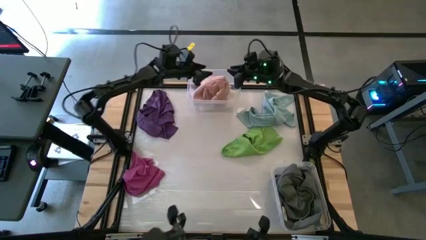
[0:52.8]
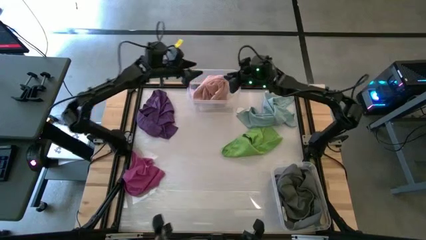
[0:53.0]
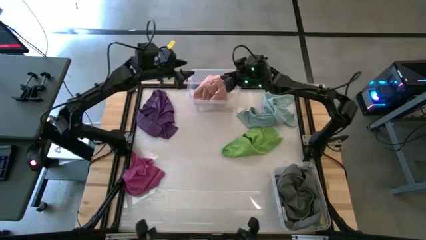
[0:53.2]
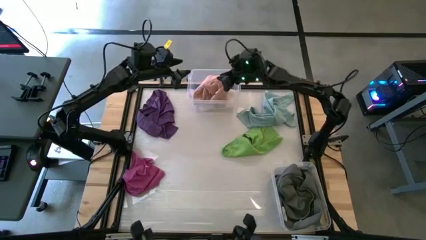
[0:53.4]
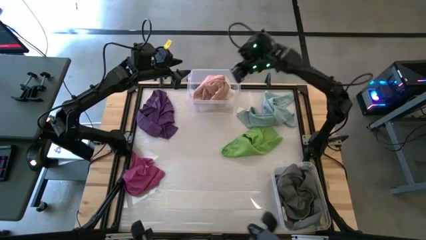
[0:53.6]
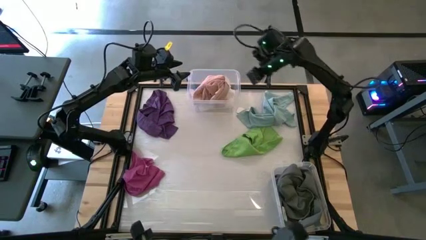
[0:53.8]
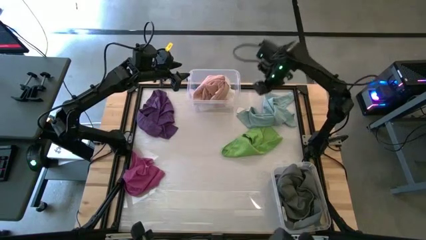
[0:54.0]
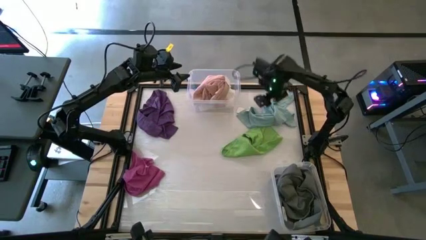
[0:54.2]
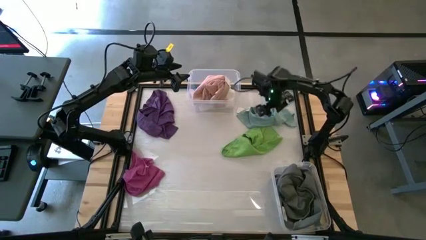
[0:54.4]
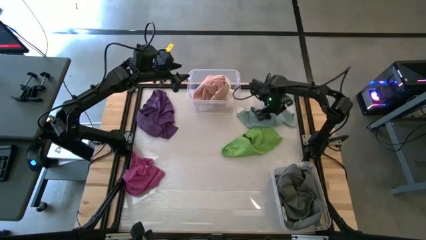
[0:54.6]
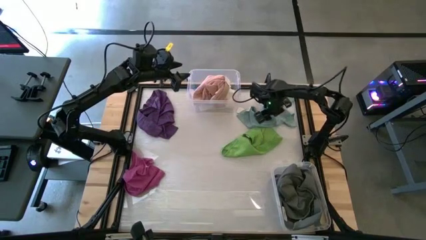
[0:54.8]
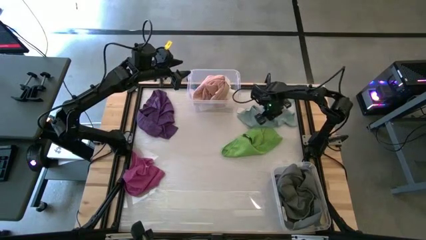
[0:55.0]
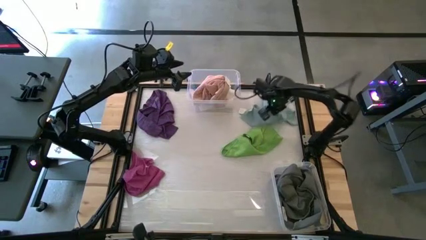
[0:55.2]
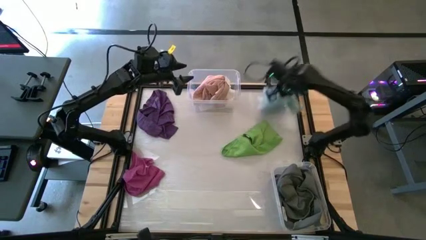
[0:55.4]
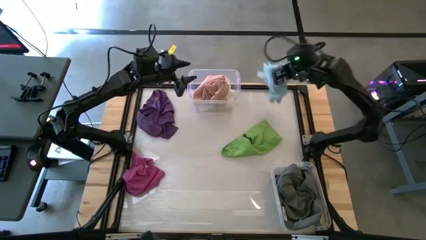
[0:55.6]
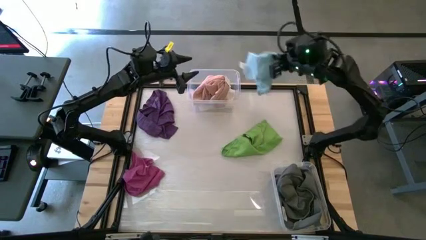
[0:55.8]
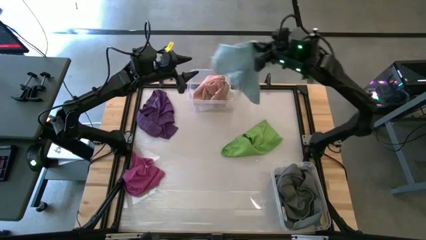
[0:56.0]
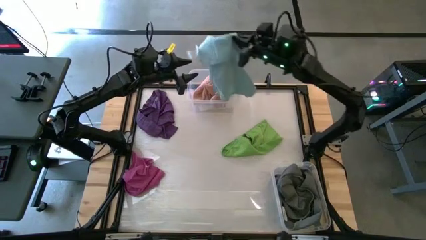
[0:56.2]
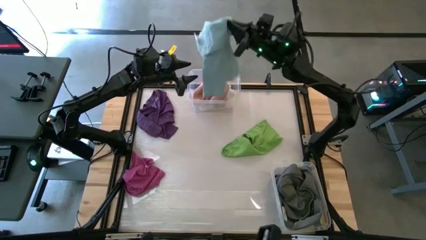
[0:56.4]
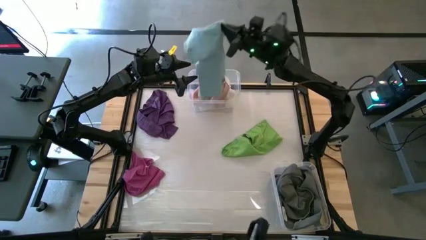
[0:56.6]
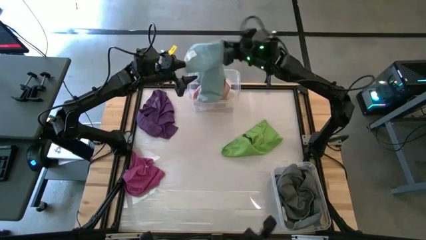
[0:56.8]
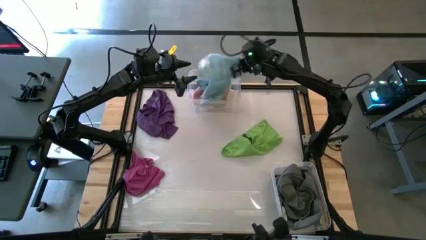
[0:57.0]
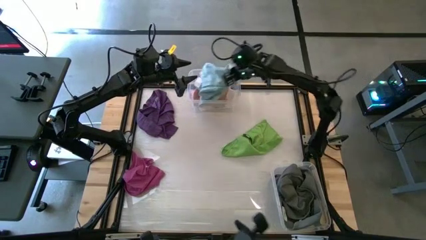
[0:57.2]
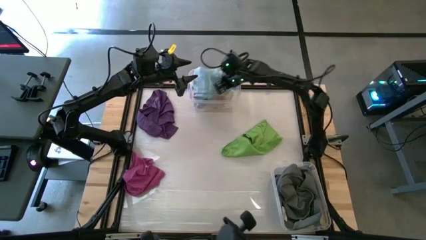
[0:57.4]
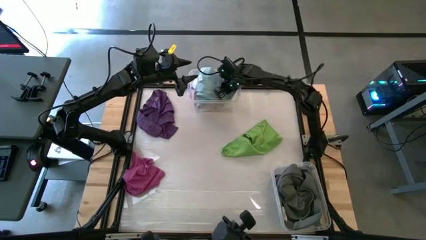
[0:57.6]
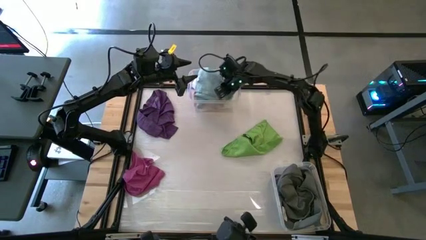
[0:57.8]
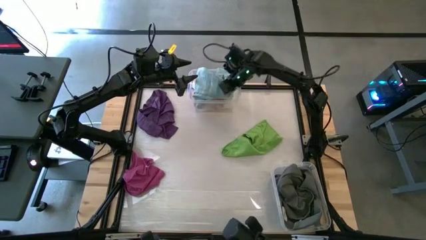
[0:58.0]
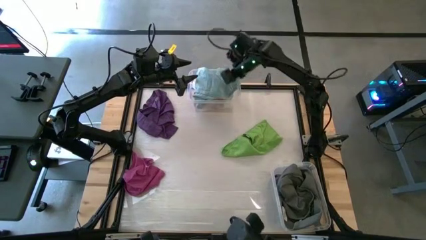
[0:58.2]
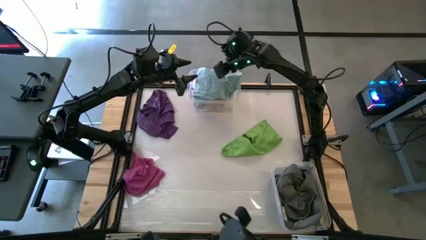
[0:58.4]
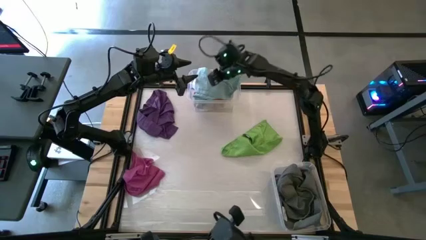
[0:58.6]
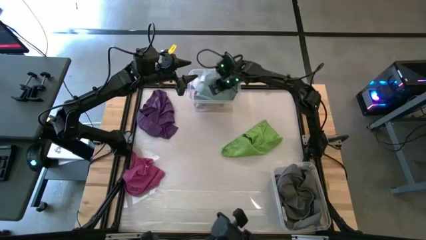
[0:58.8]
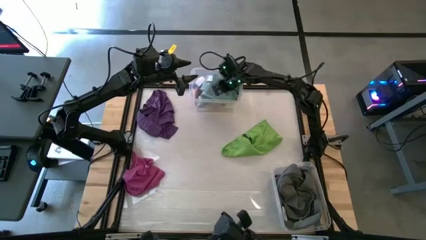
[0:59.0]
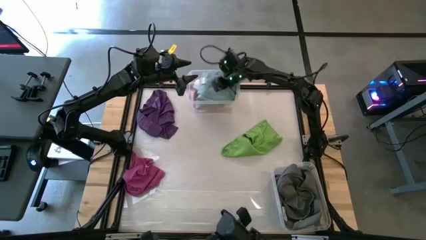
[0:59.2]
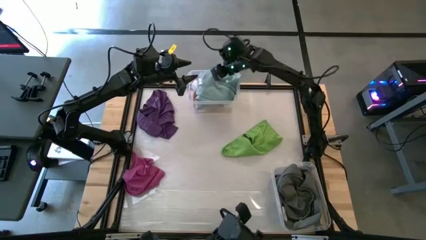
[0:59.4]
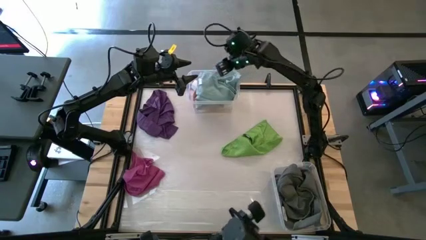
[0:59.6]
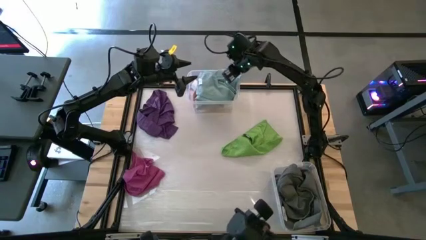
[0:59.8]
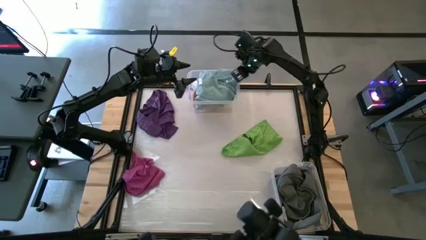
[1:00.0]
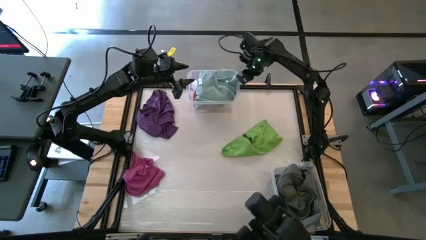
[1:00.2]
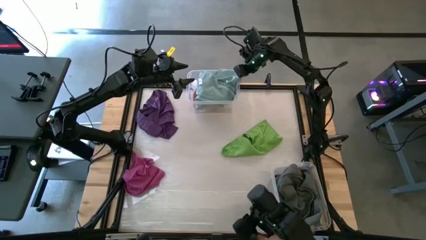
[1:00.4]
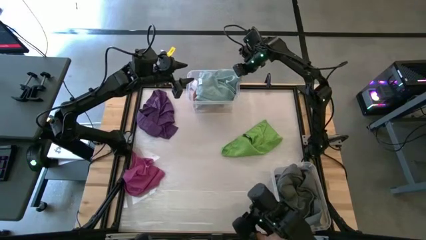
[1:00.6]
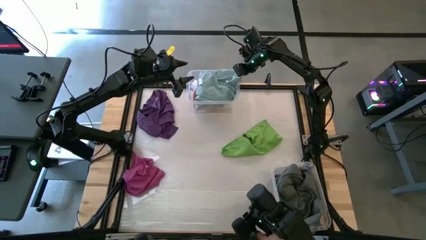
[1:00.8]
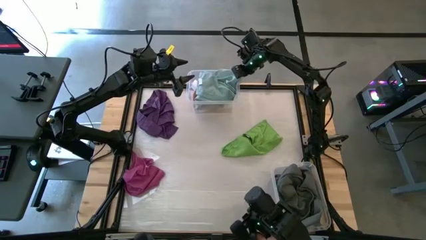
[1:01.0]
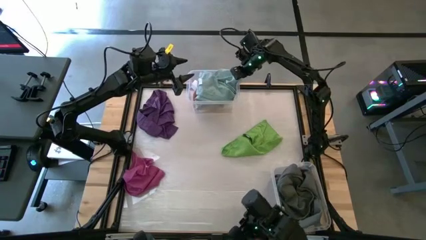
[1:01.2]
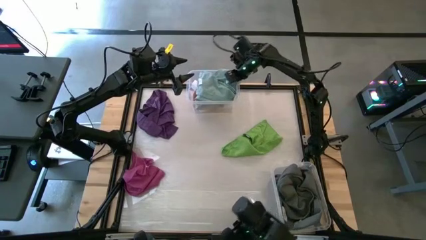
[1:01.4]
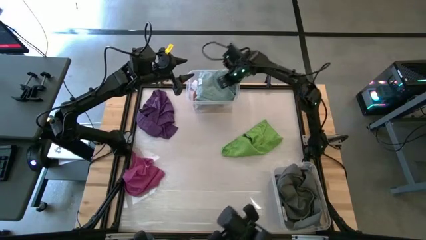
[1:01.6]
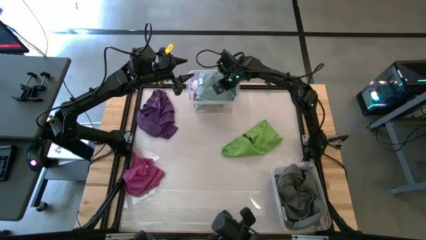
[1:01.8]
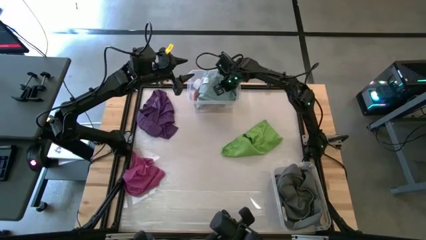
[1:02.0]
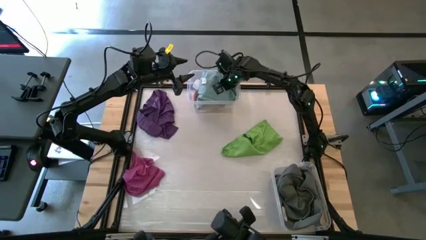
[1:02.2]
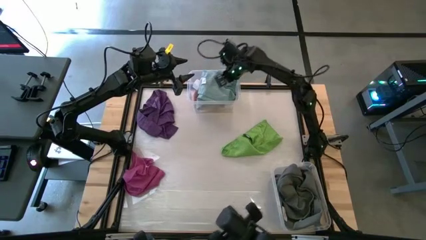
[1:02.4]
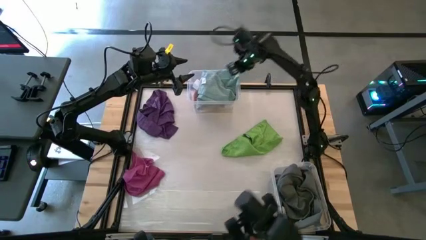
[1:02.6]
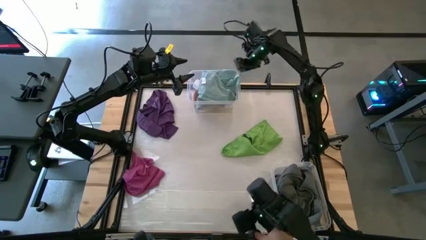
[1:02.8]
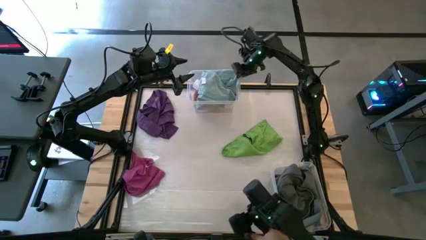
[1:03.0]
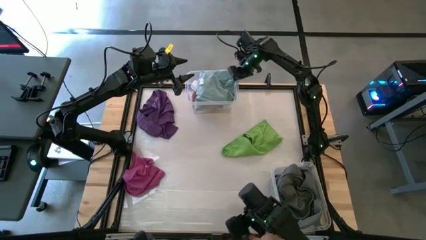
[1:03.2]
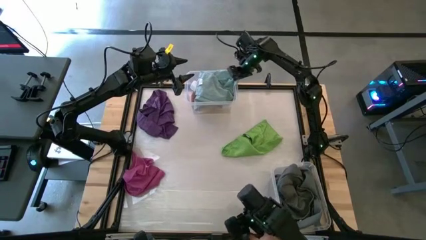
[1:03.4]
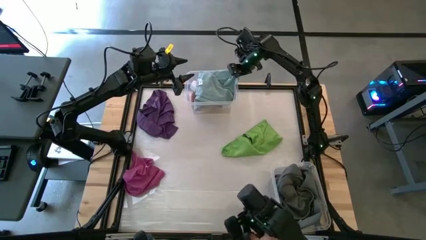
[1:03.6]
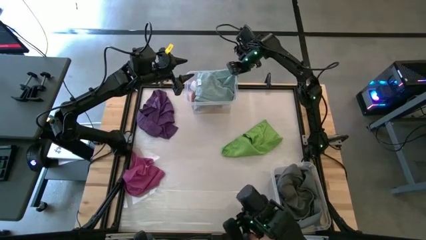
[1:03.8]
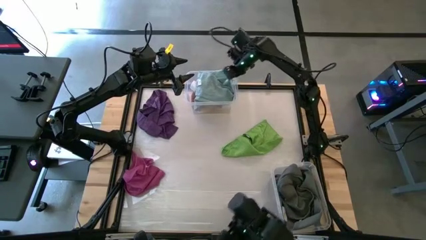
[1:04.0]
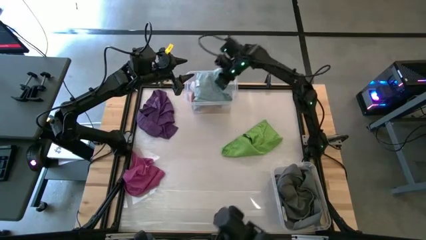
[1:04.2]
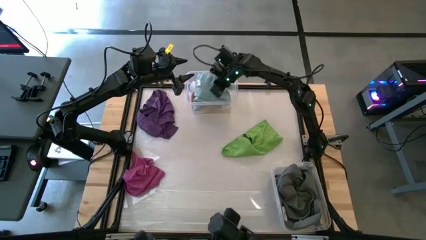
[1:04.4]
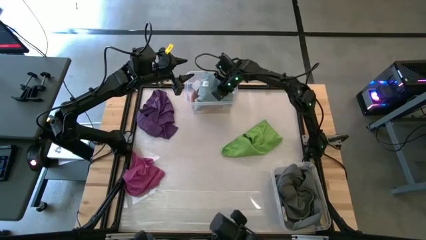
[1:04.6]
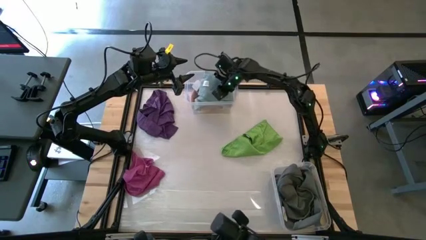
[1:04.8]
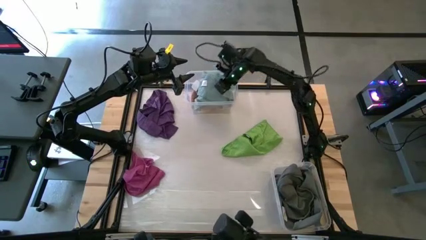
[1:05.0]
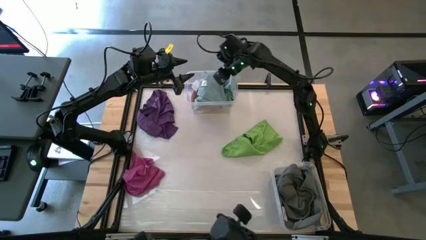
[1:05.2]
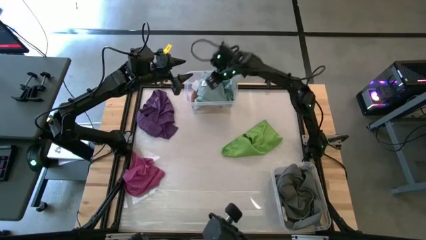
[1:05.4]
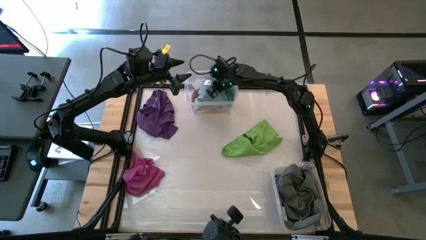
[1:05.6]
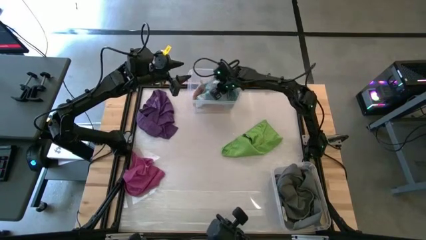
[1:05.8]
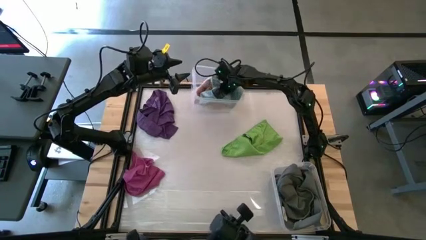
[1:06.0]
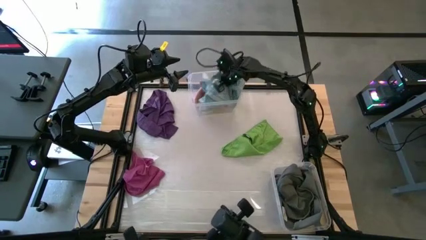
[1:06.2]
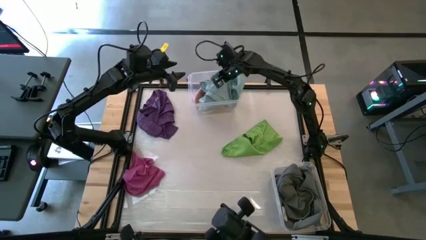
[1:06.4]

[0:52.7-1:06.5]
Task: Sort towels by color in basket
Put the light blue towel into the top transparent bin

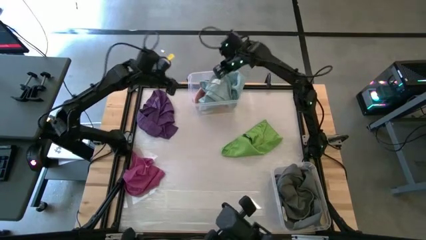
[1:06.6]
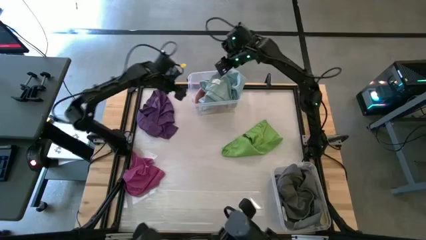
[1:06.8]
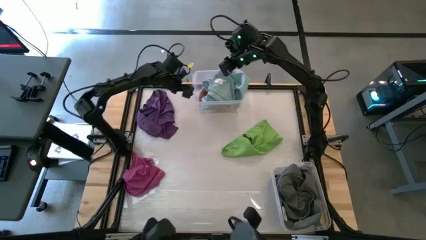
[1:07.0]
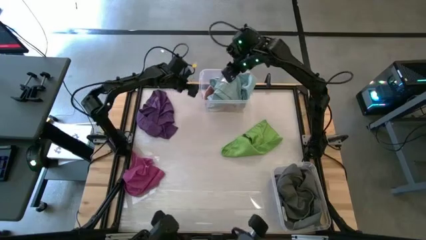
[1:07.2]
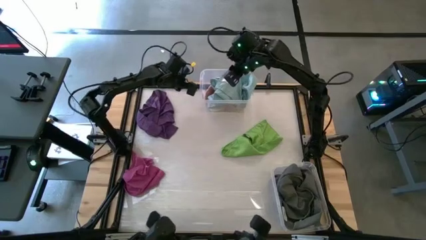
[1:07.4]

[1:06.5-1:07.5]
Adjust the top transparent bin
